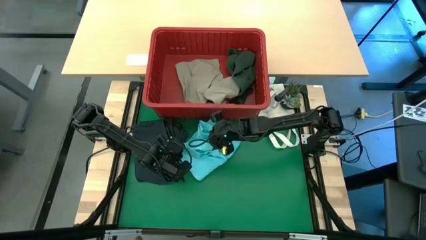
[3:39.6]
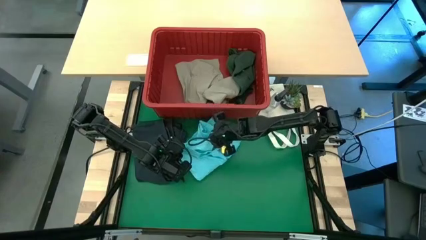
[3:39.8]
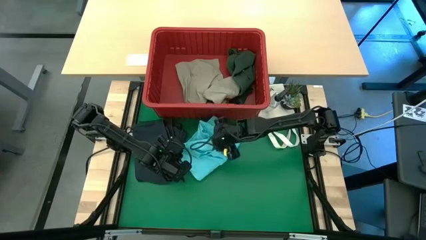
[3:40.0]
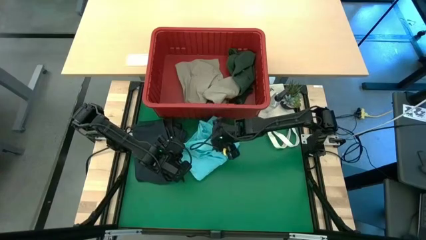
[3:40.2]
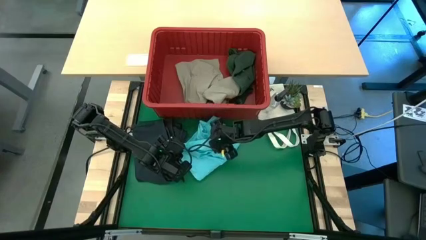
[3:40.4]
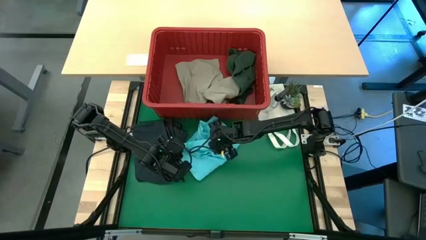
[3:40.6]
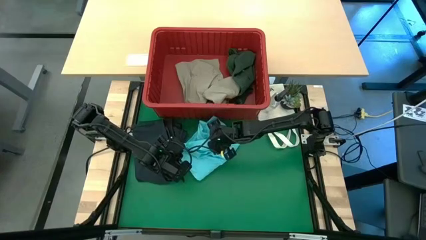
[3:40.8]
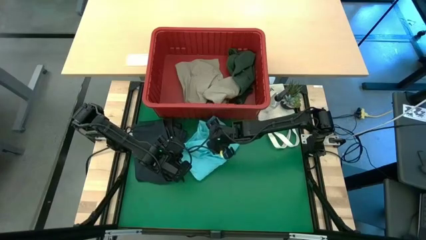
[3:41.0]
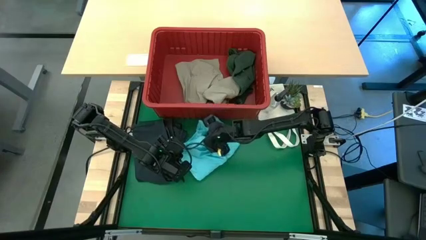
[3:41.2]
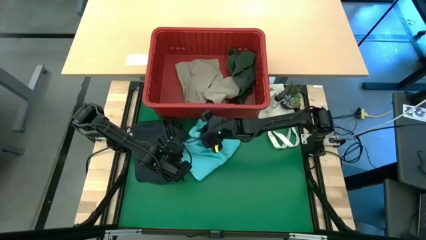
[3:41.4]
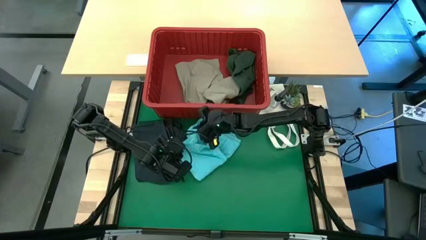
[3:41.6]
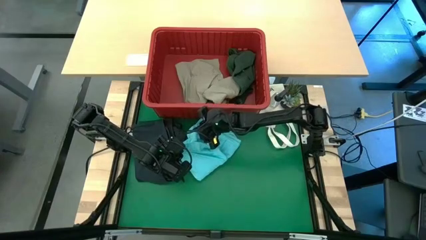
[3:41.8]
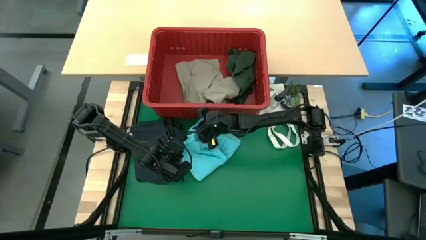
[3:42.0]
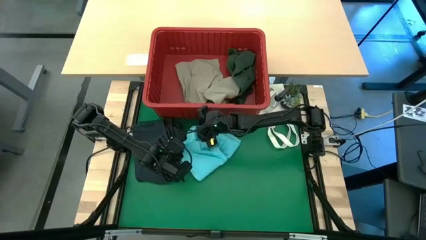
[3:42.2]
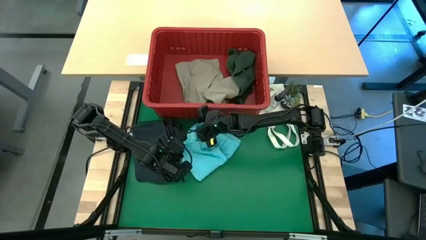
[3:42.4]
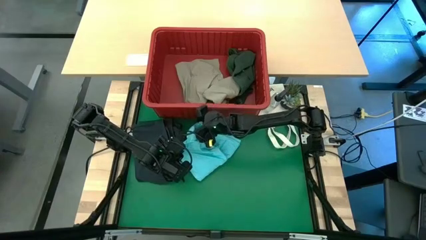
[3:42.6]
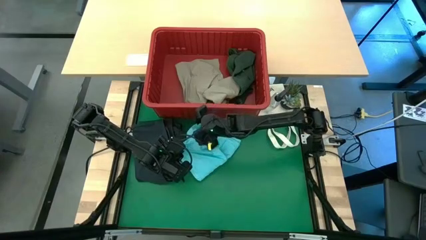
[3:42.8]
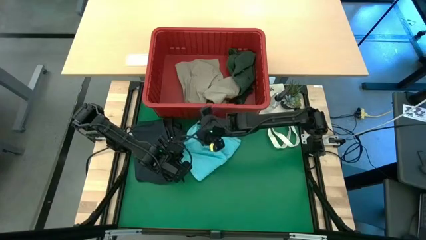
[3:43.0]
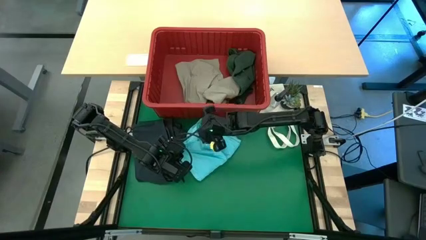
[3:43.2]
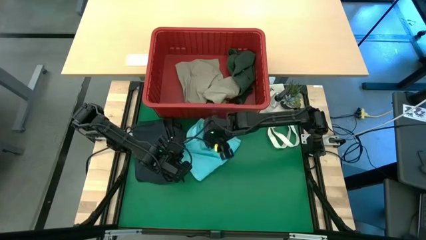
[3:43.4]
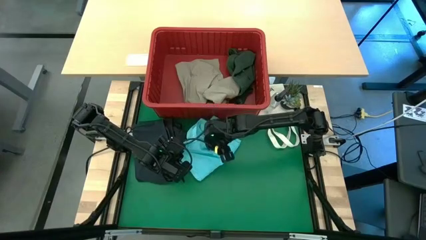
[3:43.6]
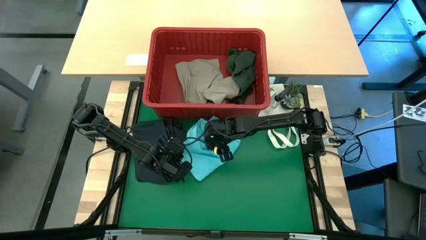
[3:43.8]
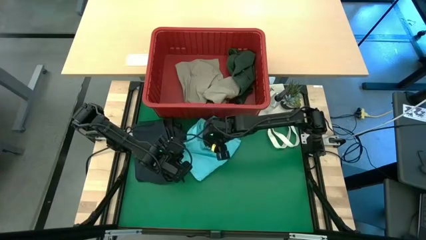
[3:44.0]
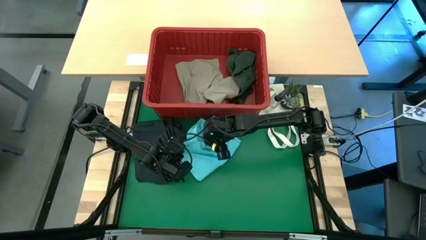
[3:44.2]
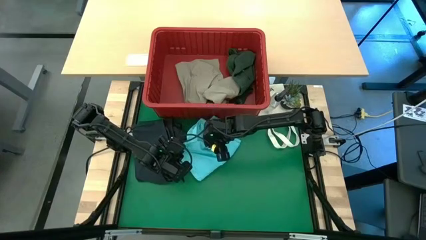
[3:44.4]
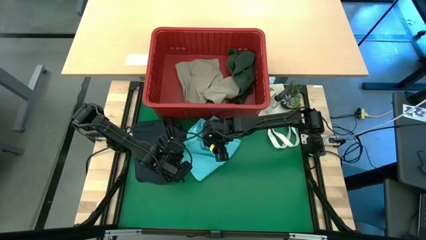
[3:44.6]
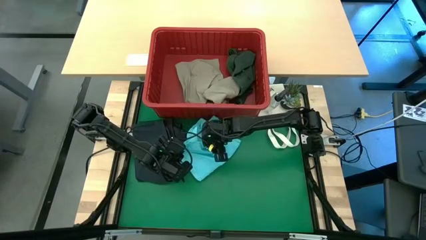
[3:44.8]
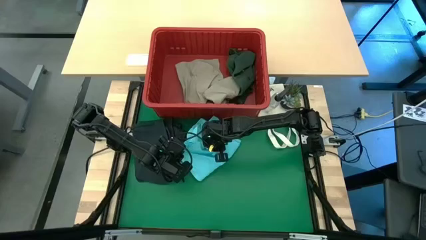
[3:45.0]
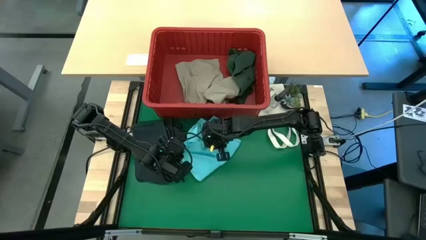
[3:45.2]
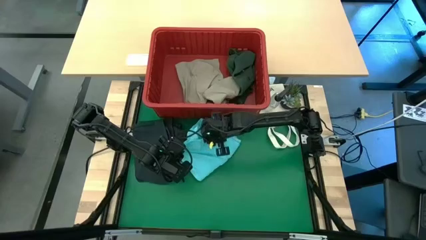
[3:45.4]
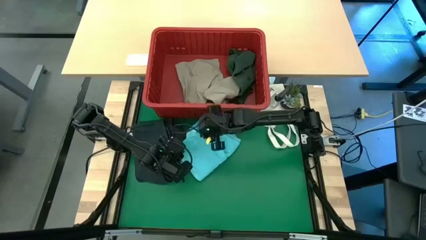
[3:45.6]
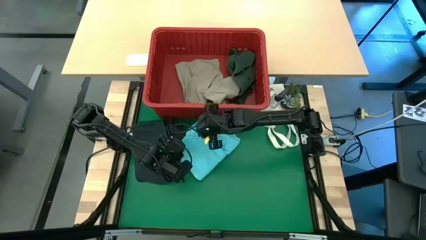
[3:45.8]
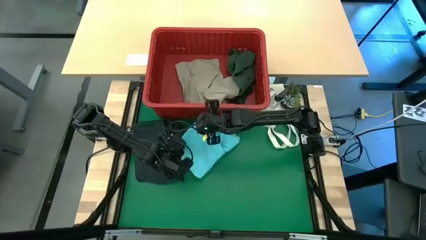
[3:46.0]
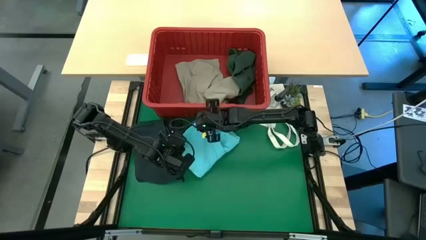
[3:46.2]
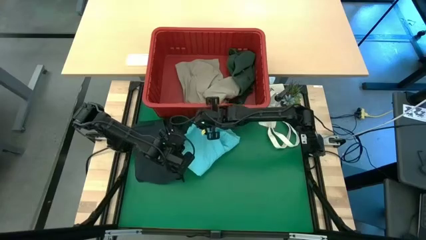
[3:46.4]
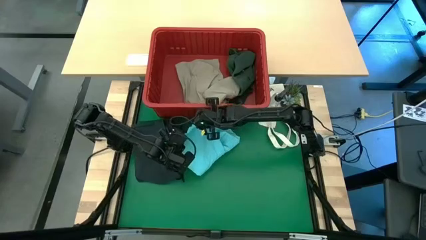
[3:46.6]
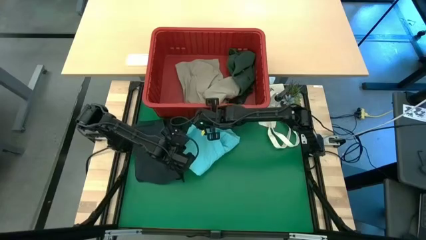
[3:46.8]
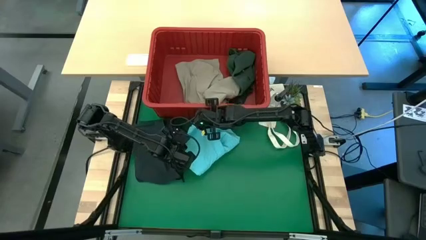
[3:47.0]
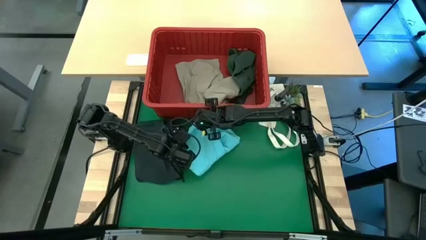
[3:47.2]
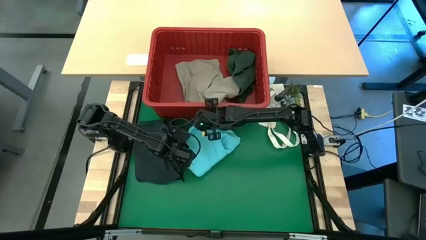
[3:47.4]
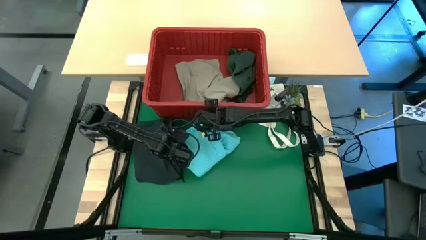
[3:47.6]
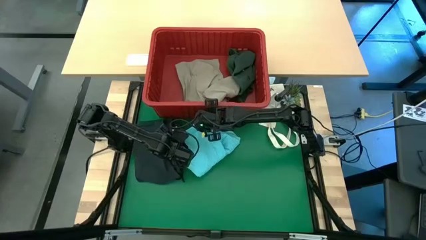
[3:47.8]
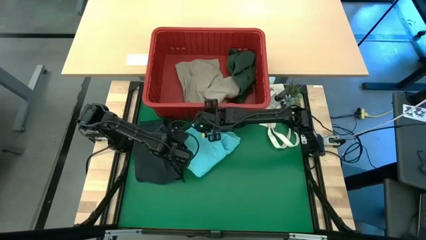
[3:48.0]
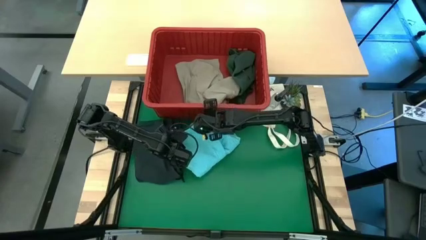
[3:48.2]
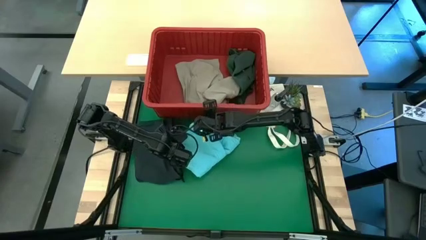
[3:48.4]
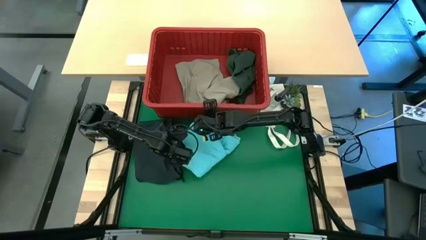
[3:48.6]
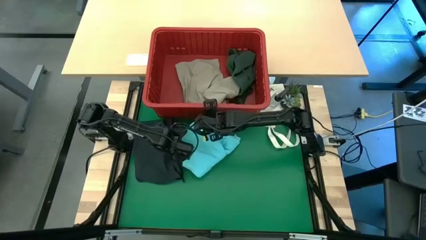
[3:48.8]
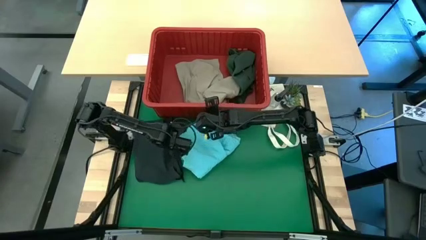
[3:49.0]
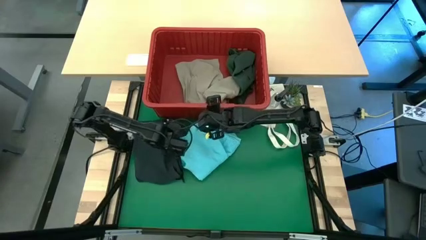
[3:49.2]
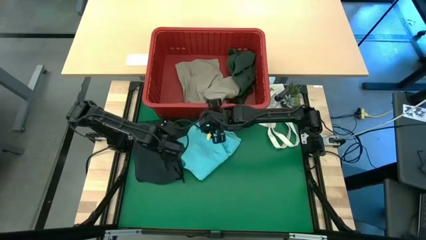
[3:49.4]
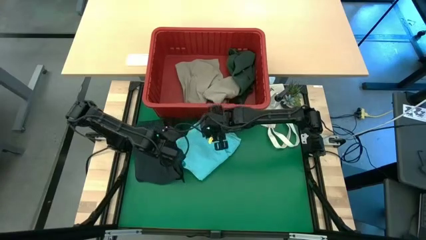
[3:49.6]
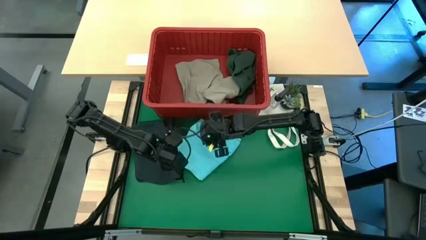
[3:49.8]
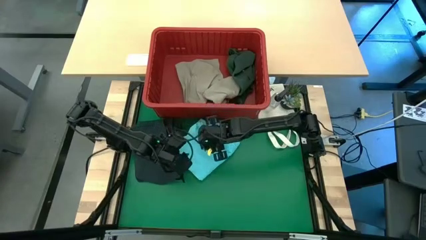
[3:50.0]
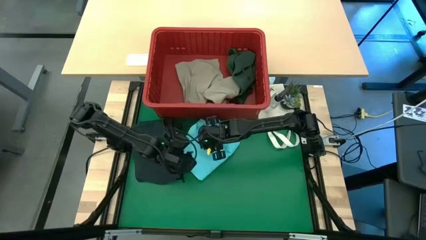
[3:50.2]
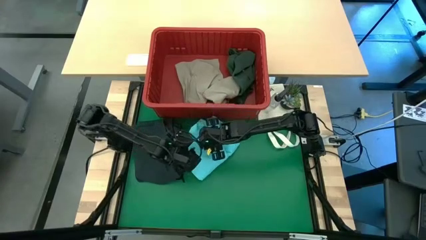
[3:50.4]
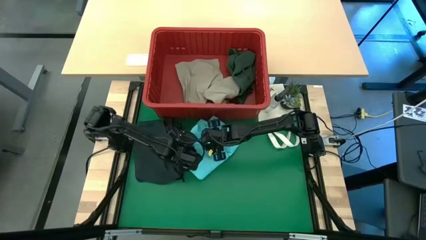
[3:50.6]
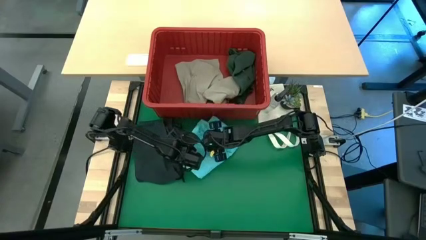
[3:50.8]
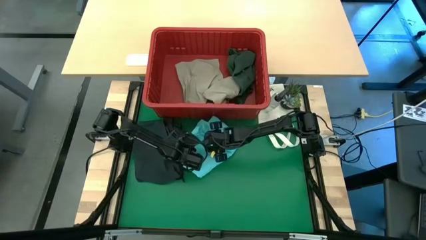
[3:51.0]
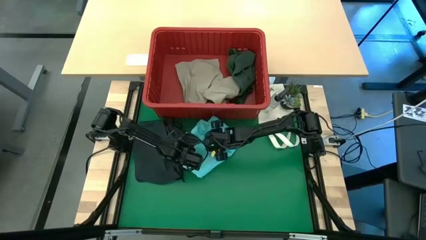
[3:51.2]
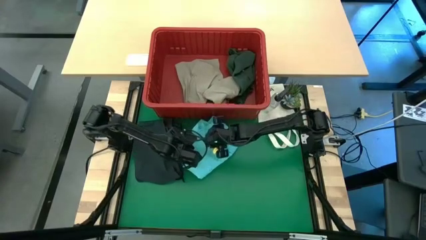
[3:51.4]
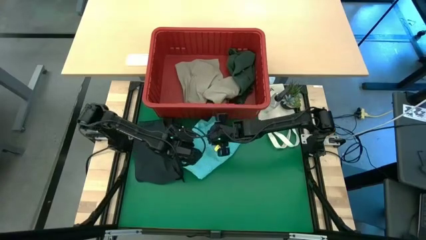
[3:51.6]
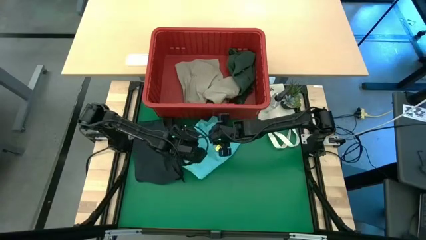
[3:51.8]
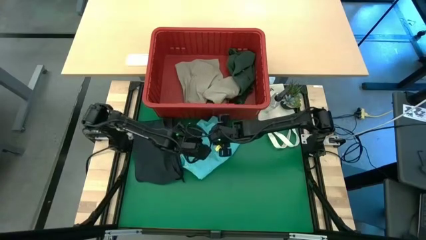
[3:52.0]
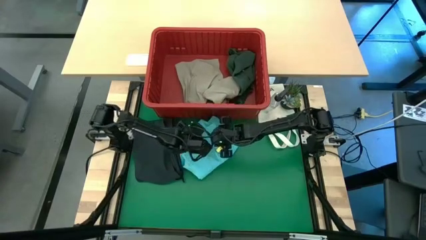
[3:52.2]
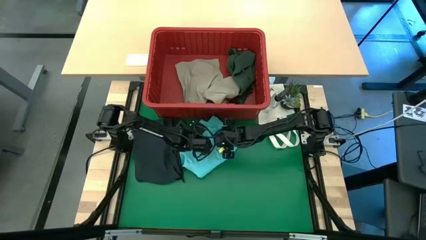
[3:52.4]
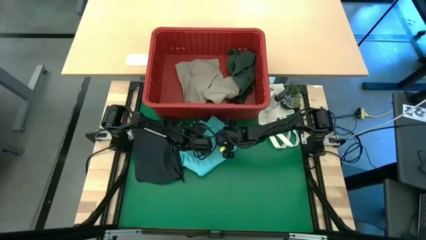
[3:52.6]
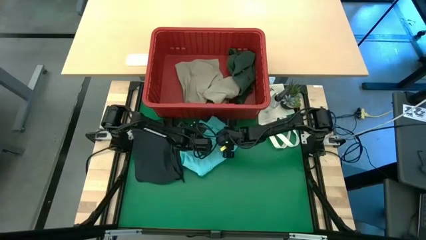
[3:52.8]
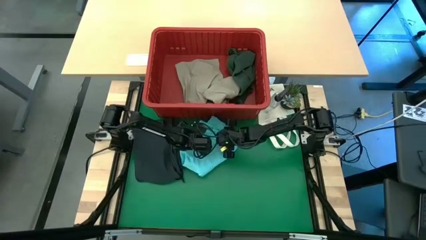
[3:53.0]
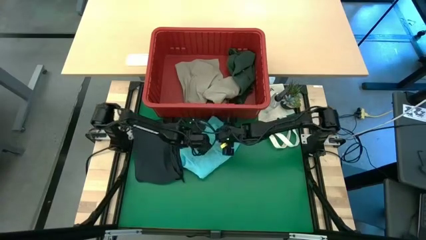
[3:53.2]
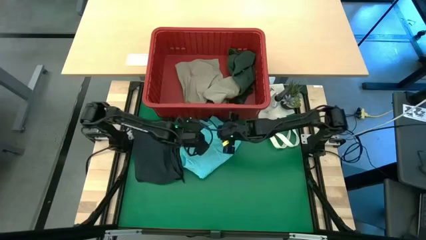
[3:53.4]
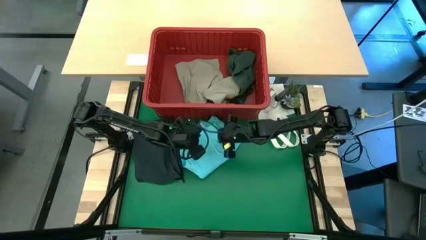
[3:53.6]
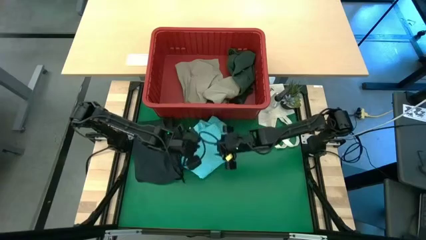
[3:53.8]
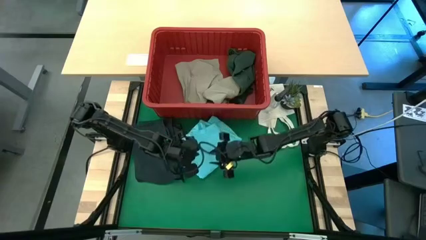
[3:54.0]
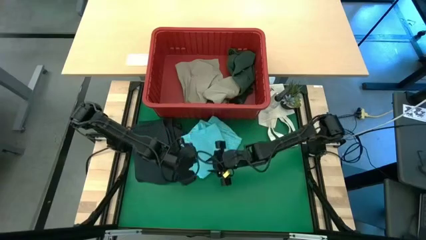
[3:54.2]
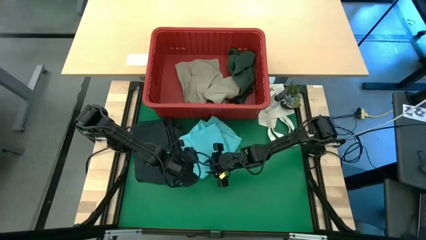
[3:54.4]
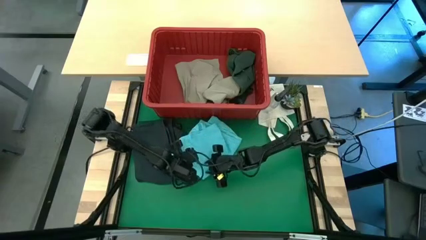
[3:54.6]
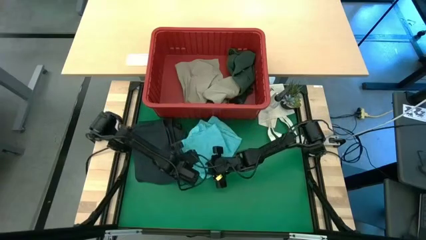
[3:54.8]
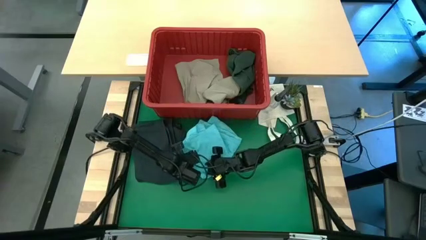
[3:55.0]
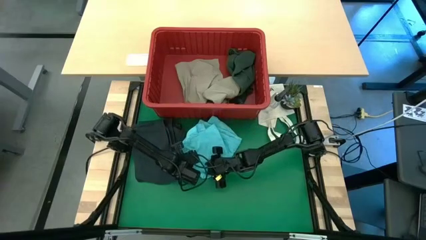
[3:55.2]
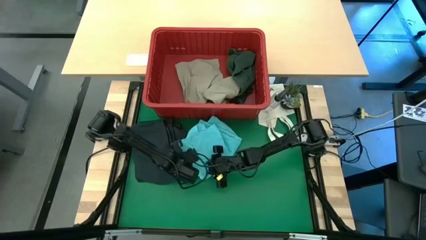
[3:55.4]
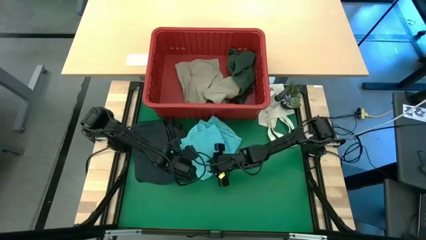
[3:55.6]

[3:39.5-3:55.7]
Task: Fold Laundry from Bin
Fold the blue shorts from the red laundry bin
